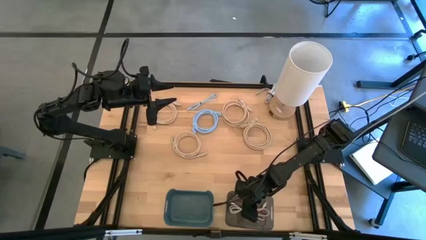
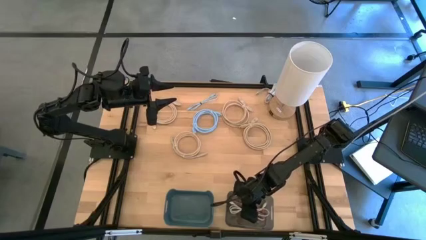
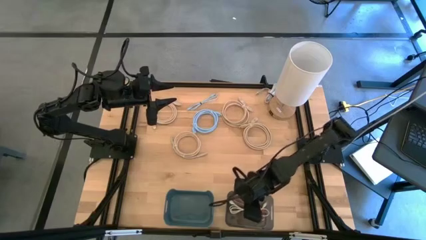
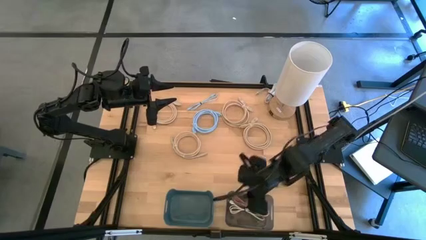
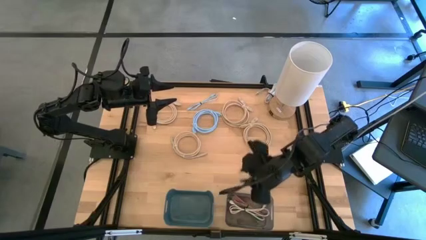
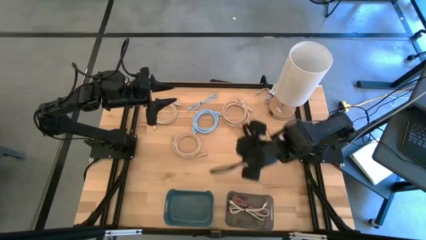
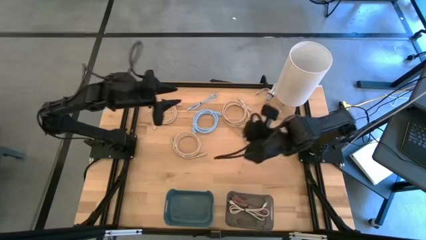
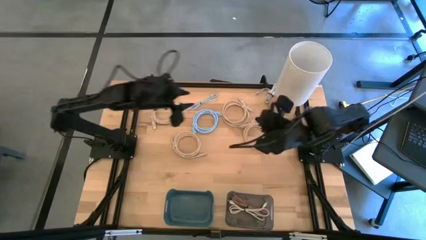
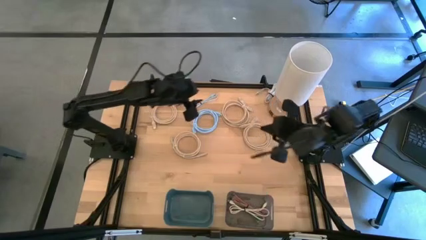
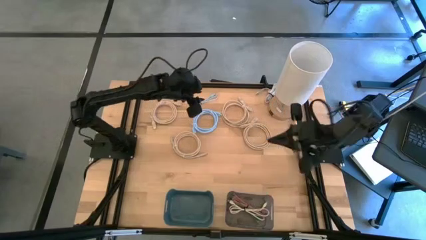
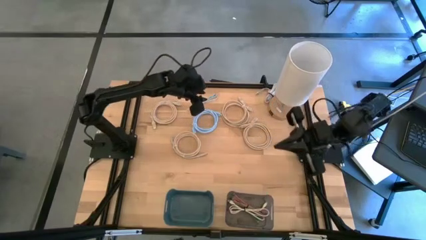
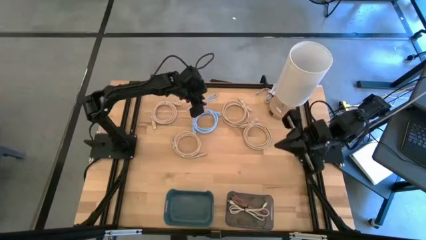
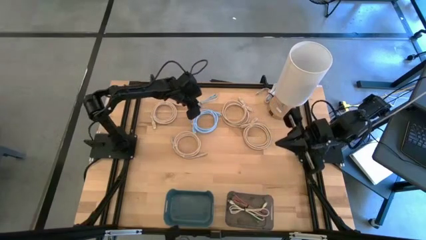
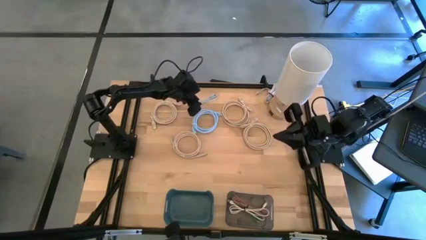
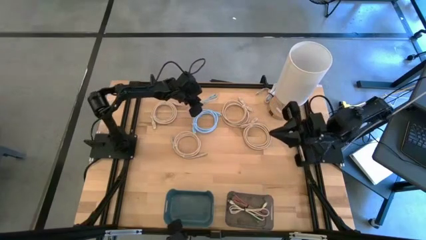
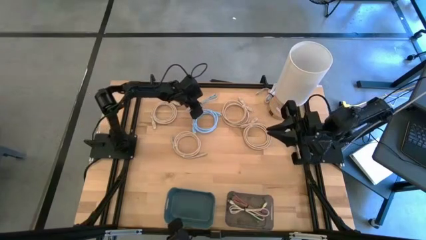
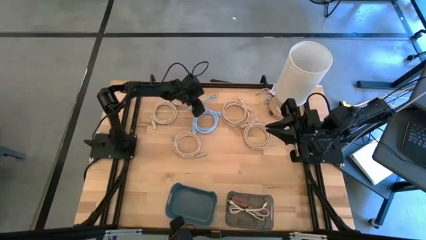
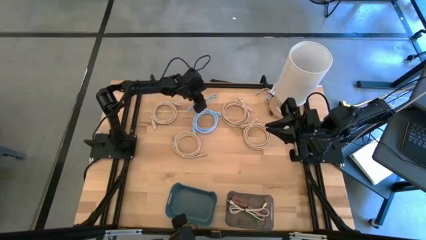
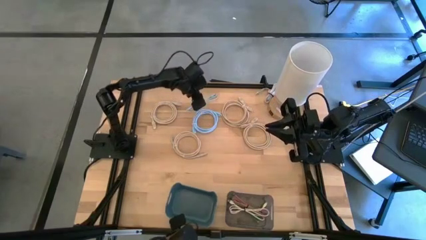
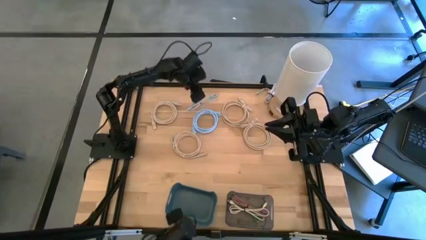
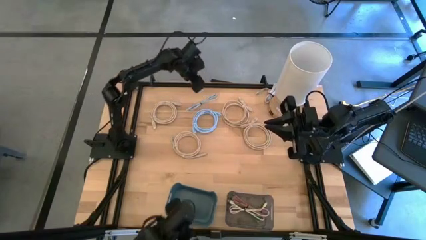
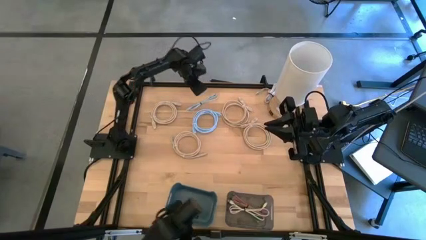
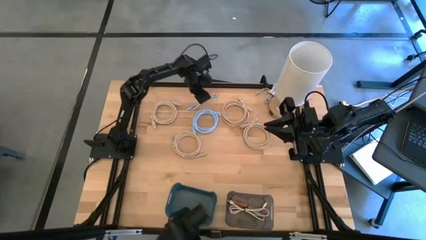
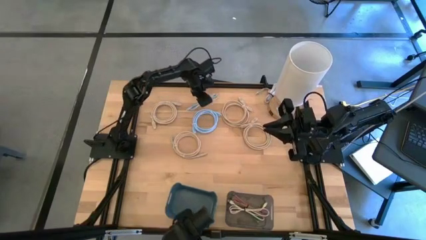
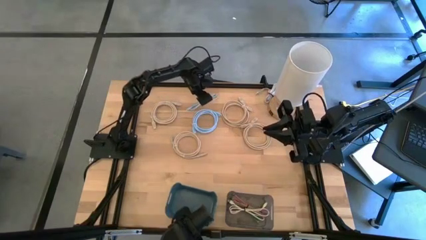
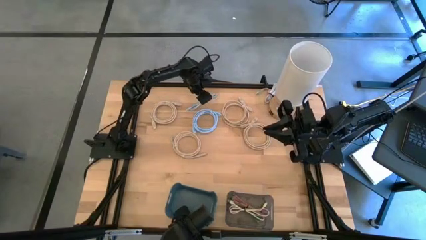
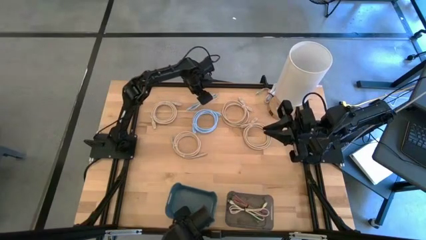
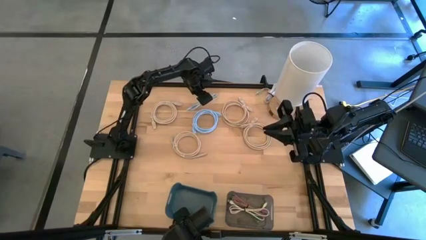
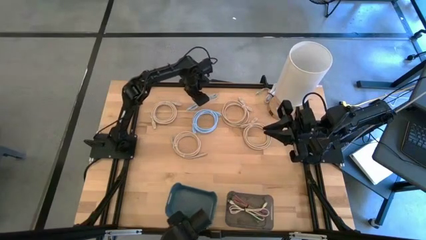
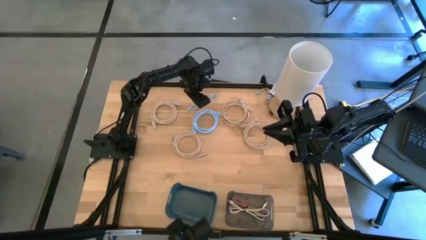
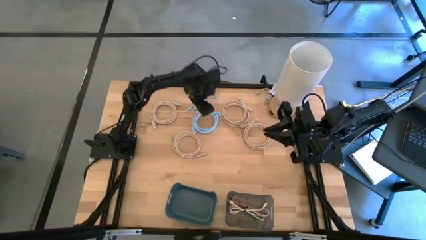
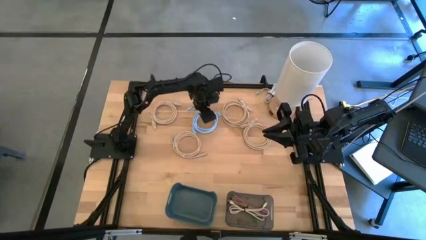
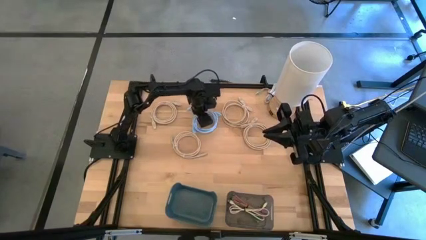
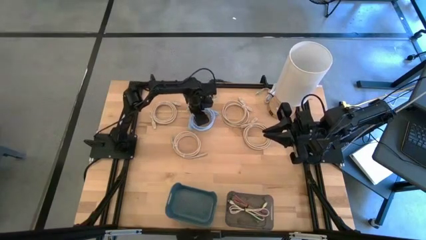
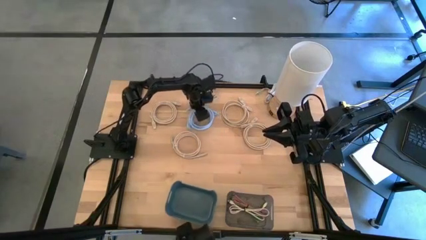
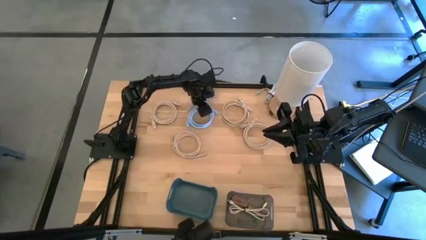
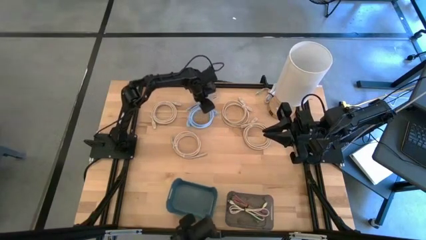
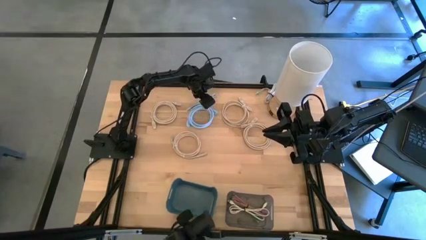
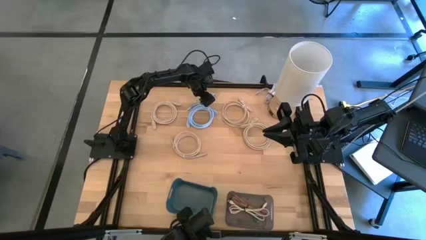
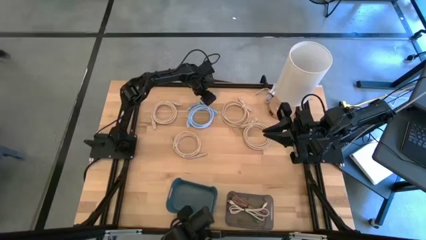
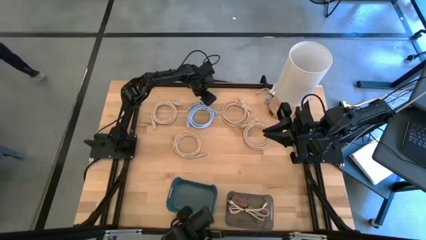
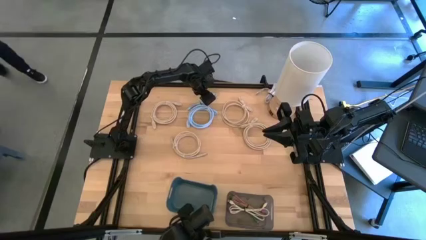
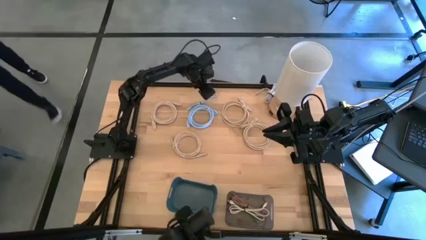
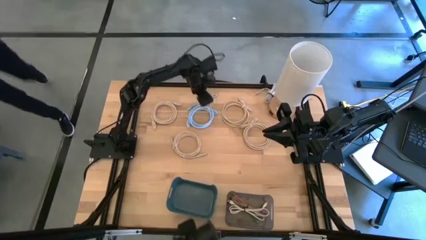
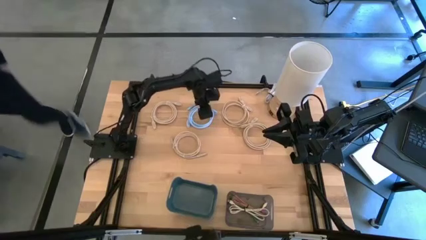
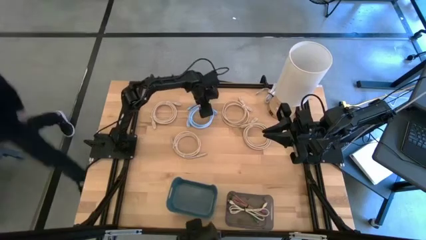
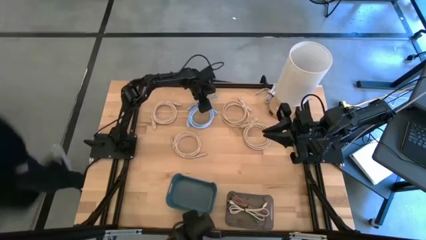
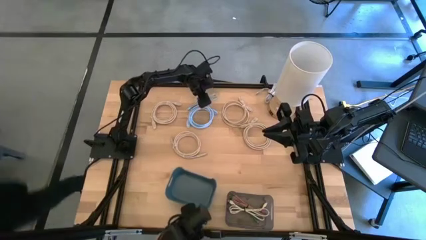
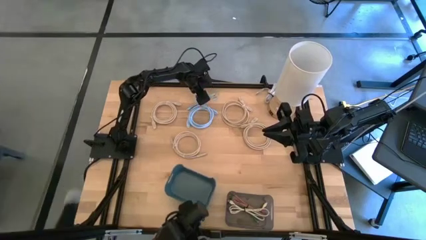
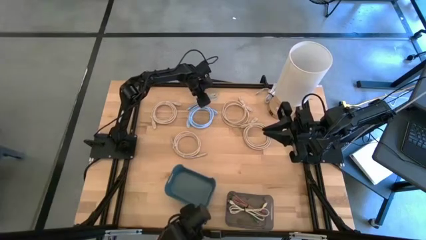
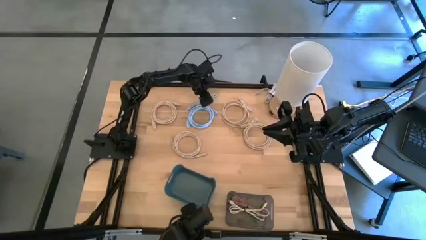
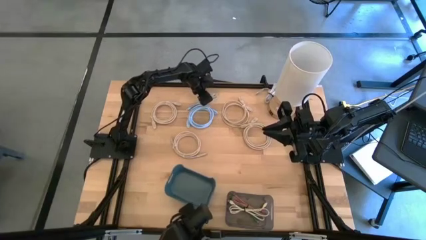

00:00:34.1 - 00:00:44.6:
Put the blue charger cable into the black bin
